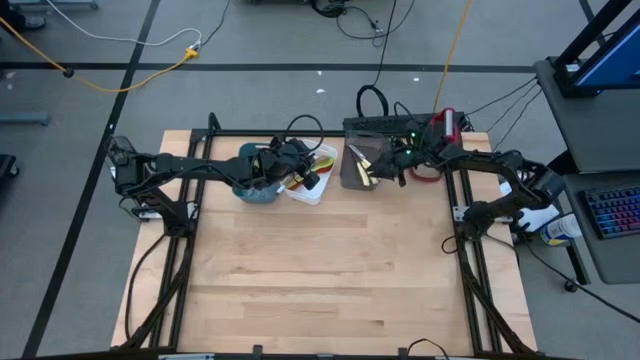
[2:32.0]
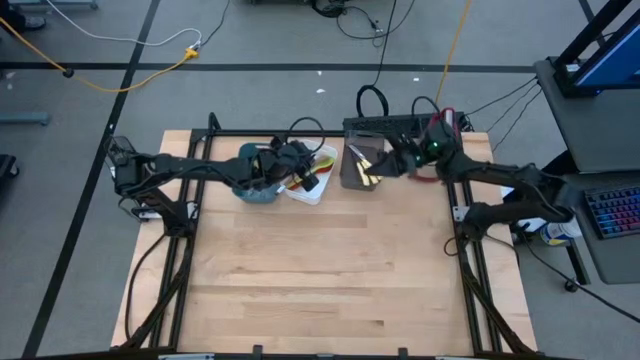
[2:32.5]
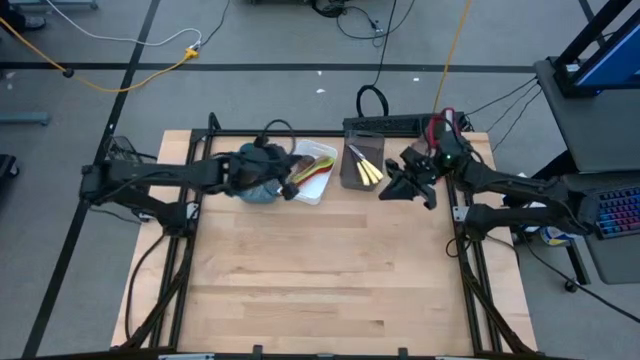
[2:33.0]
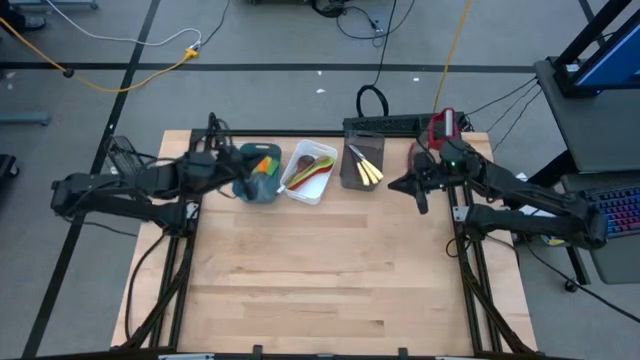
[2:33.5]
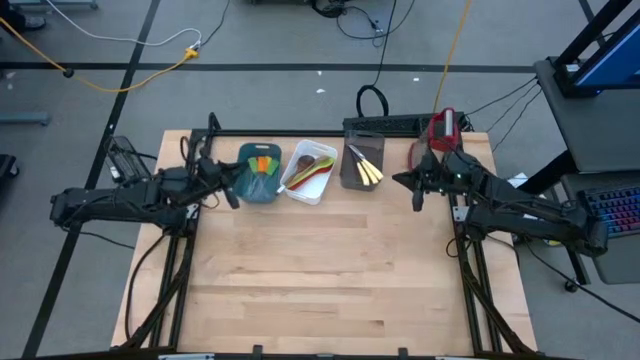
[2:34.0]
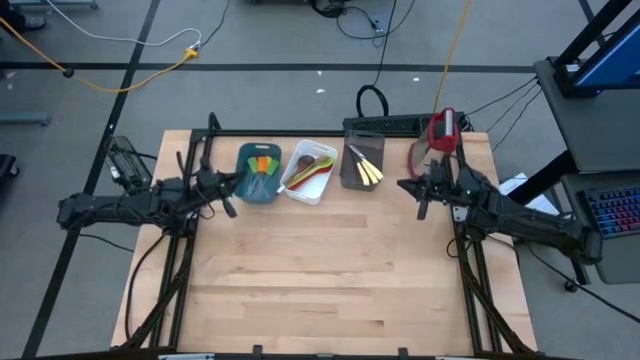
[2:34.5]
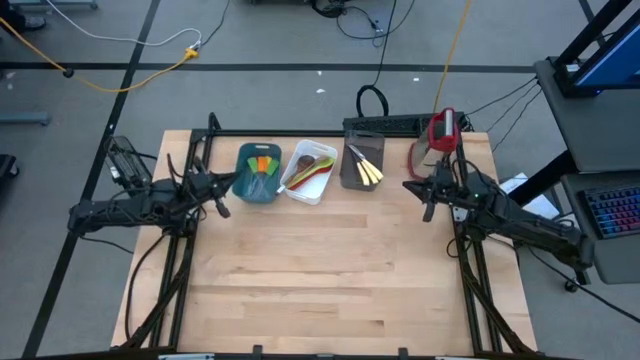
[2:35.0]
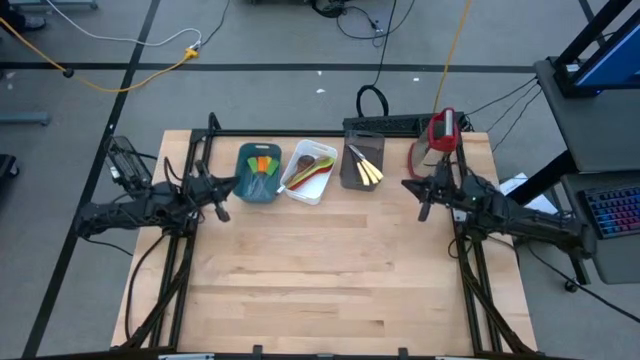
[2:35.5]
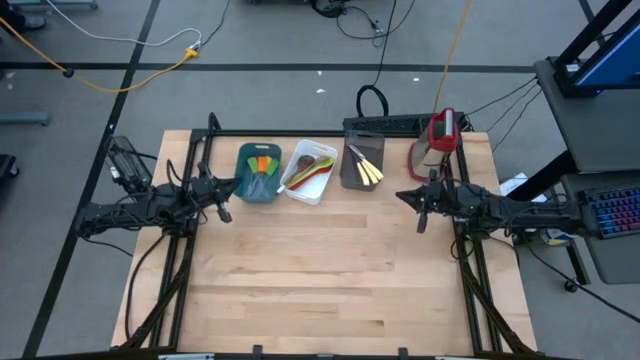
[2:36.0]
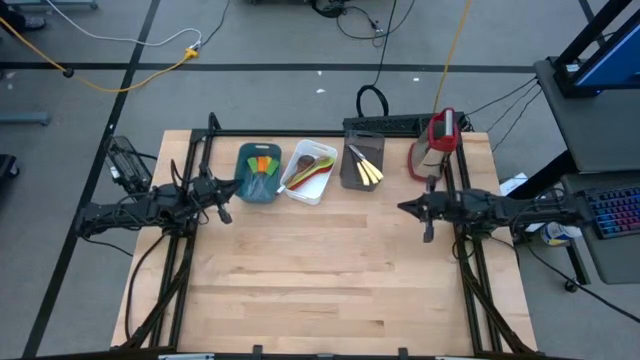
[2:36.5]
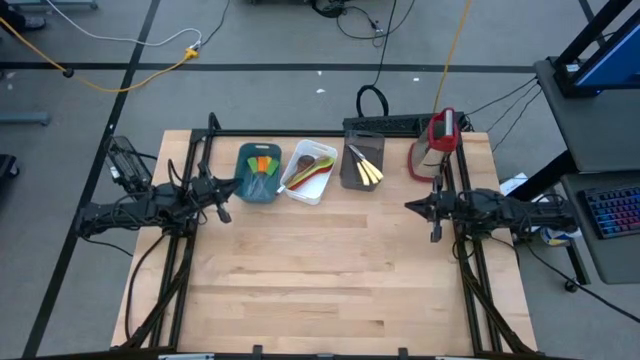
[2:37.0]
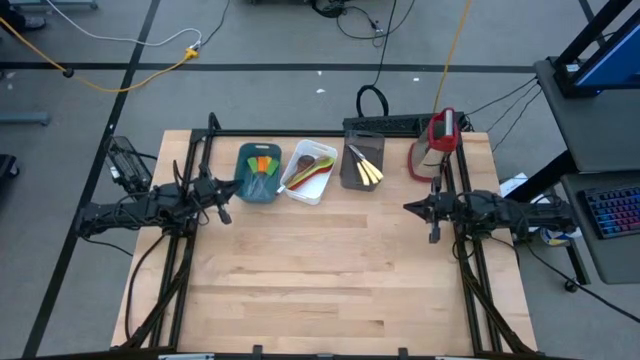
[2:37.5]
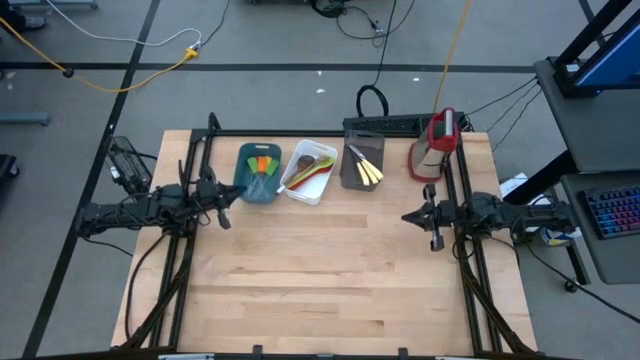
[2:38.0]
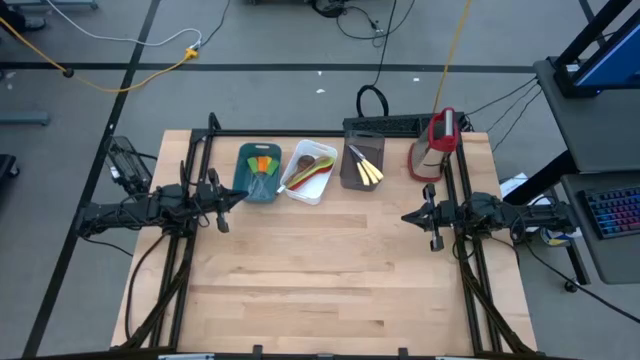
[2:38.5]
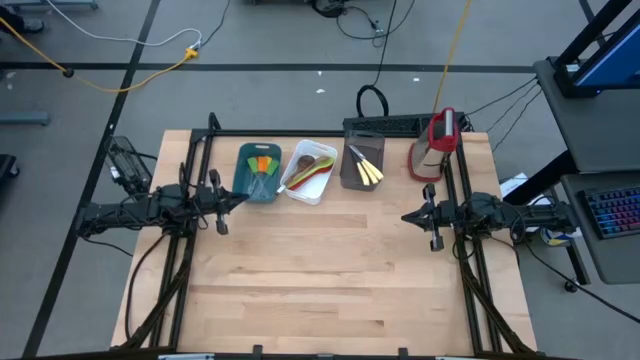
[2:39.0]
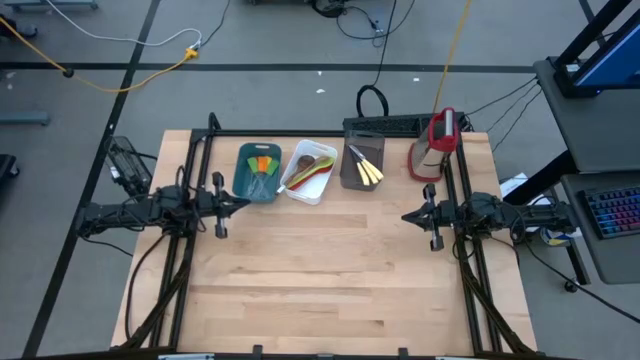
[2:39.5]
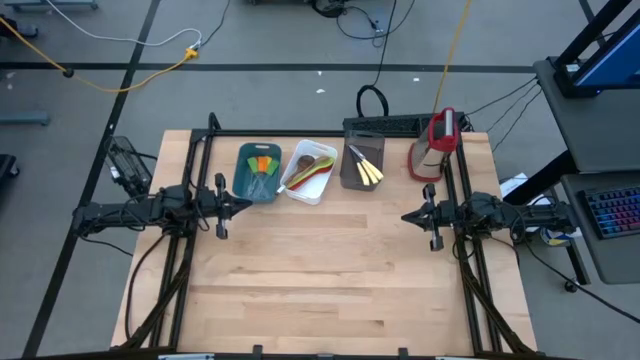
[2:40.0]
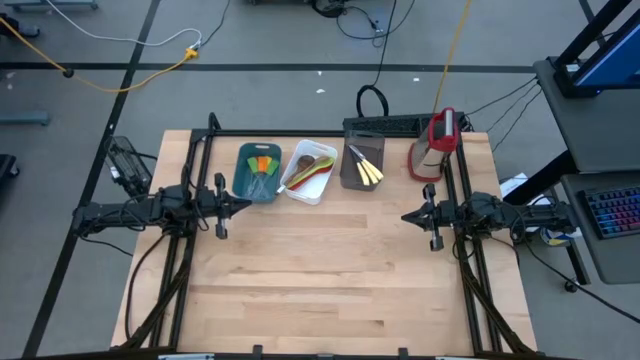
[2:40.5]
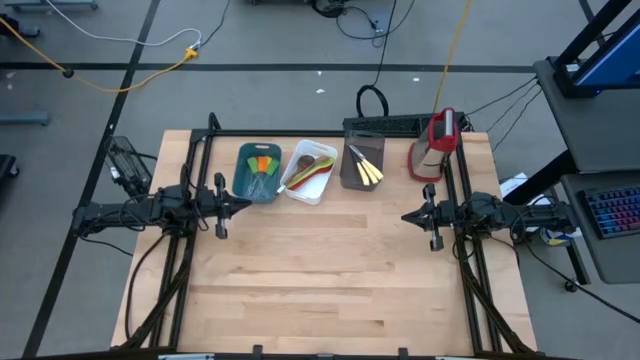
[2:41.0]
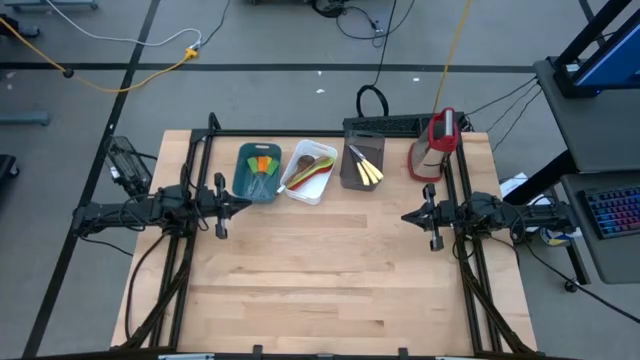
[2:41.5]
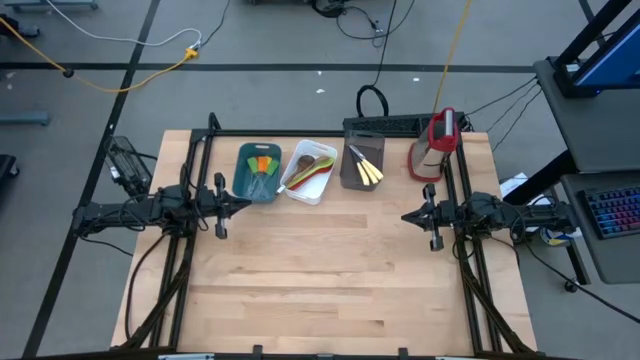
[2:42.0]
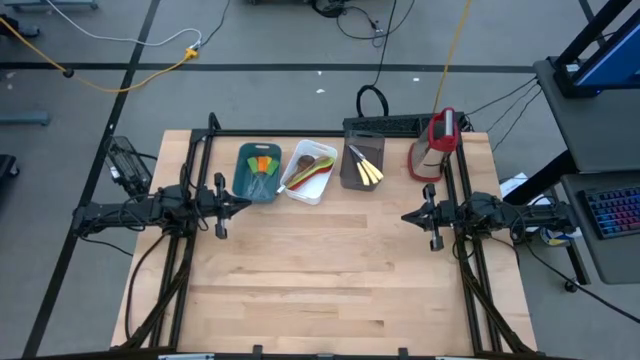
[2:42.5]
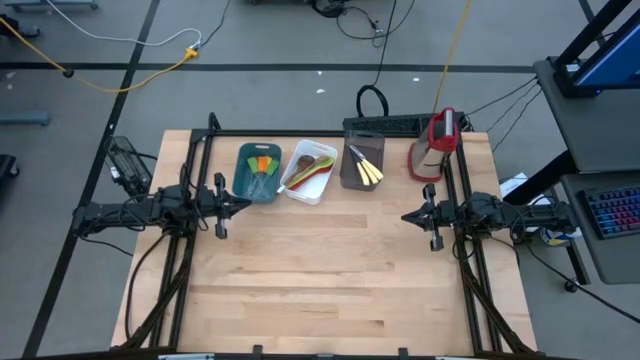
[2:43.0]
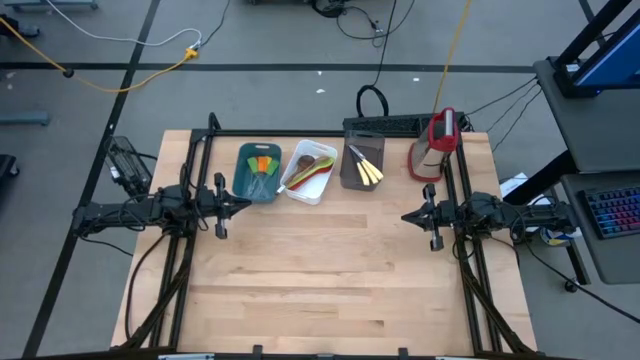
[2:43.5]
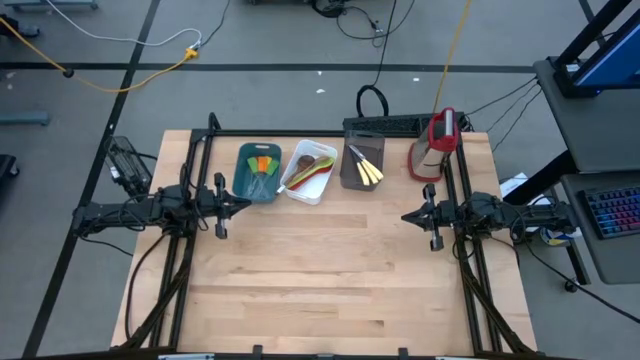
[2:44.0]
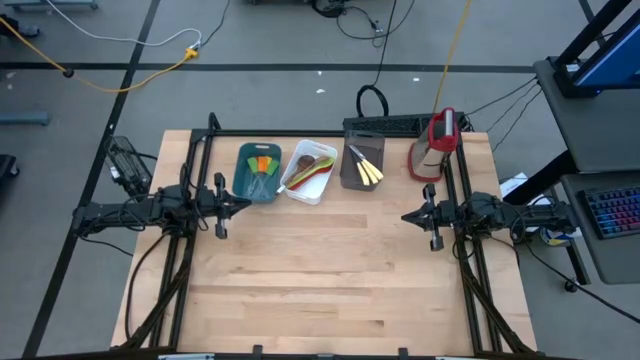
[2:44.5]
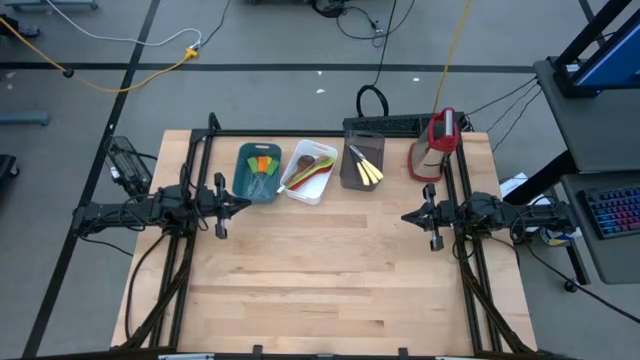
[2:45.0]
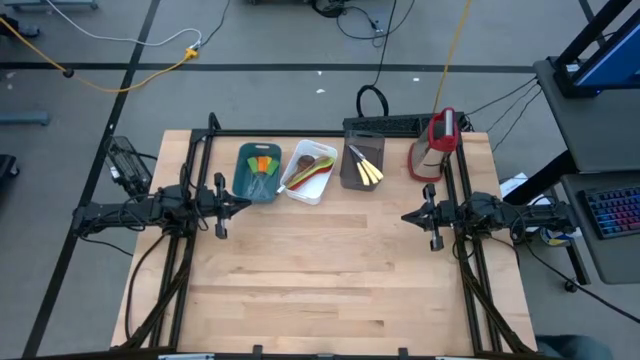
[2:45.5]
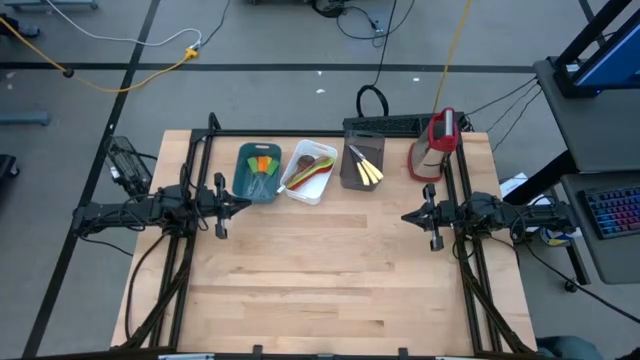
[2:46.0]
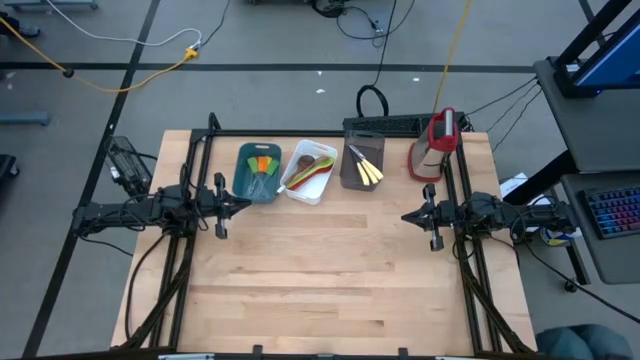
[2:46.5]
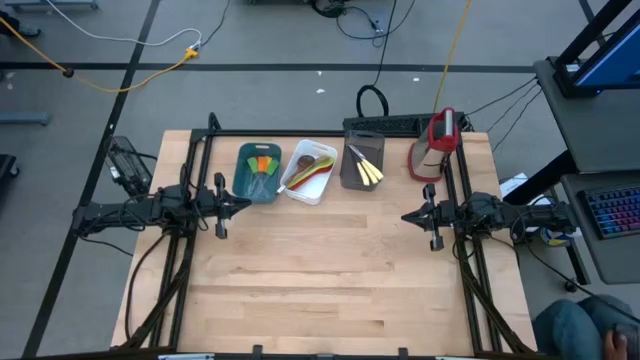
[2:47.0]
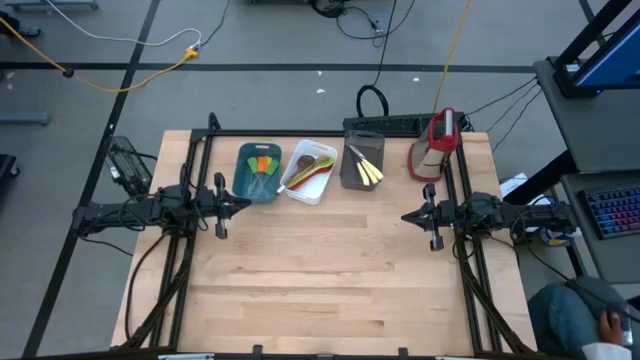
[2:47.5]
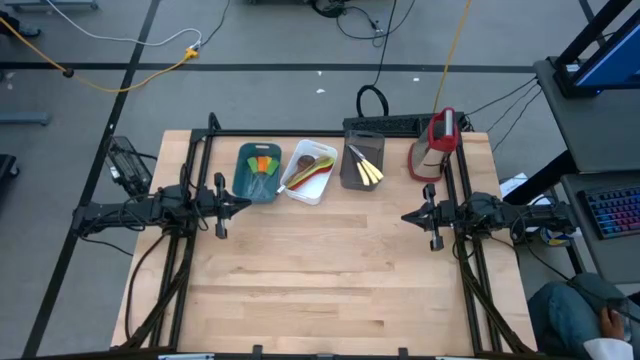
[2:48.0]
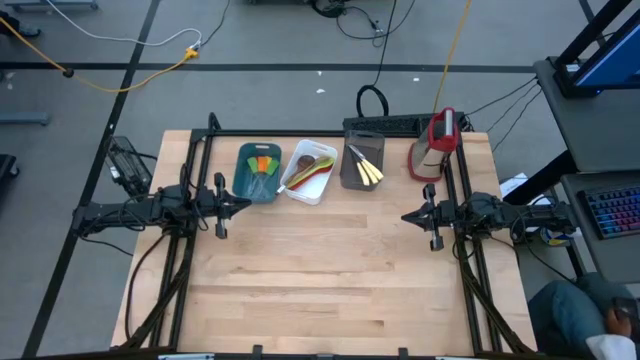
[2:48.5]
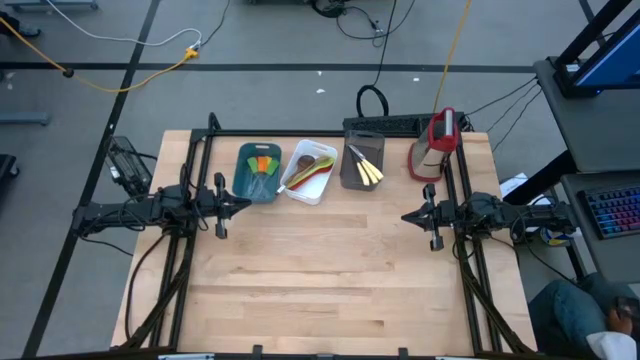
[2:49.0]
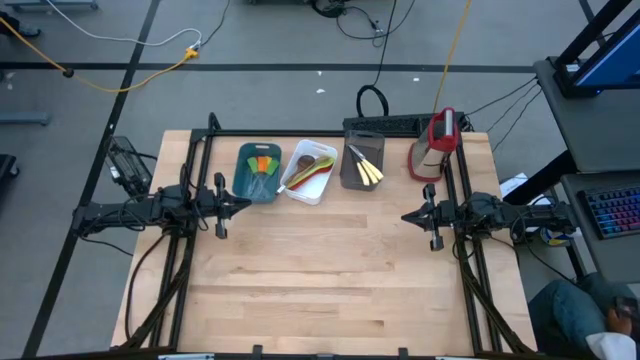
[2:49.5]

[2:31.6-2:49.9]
Task: Pick & Place Kitchen Items
Return to Home Position

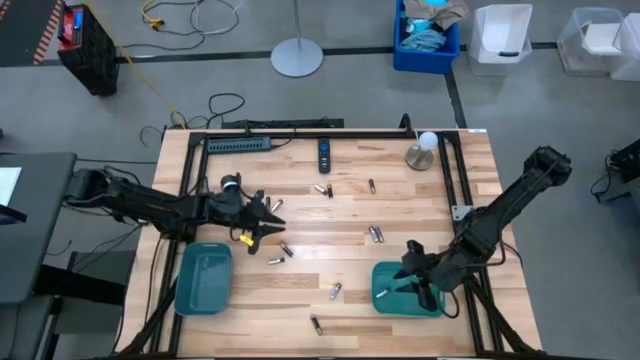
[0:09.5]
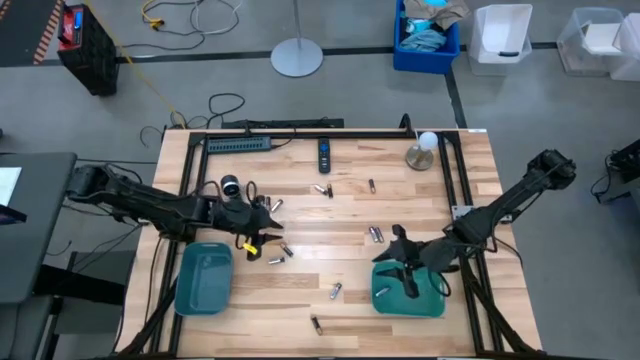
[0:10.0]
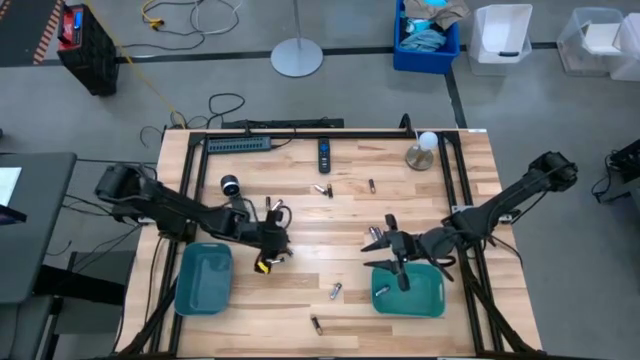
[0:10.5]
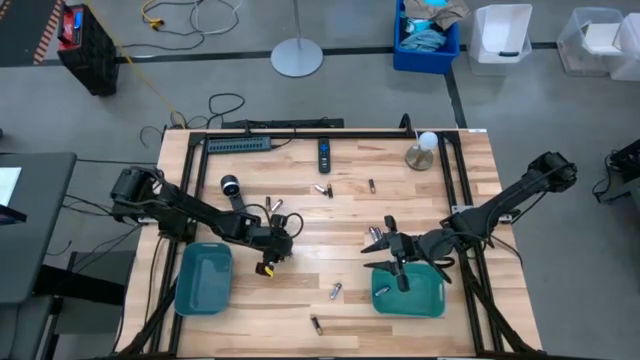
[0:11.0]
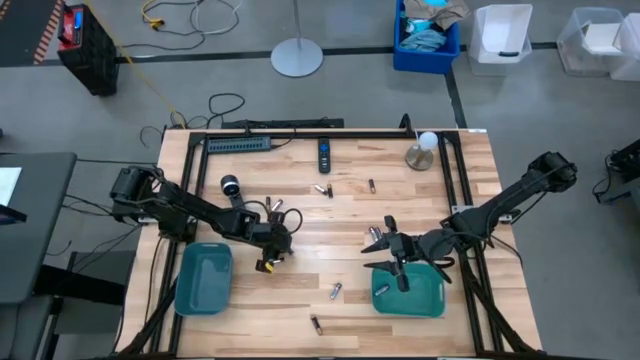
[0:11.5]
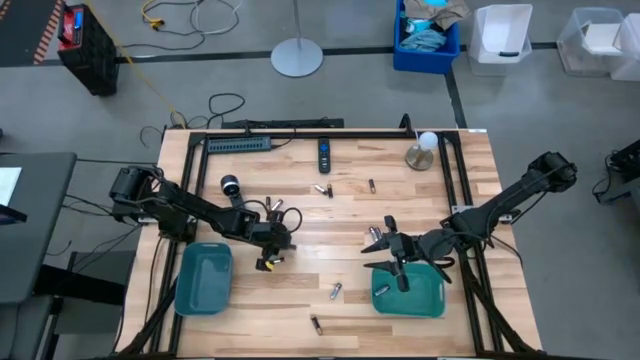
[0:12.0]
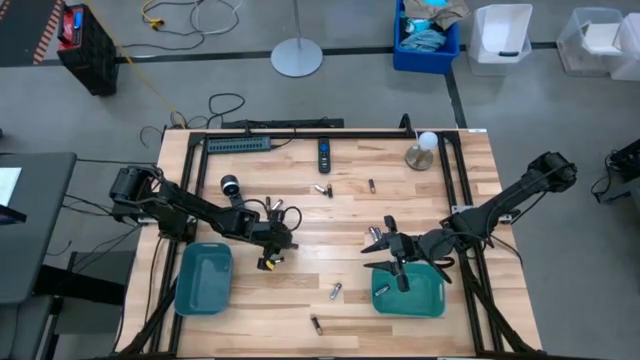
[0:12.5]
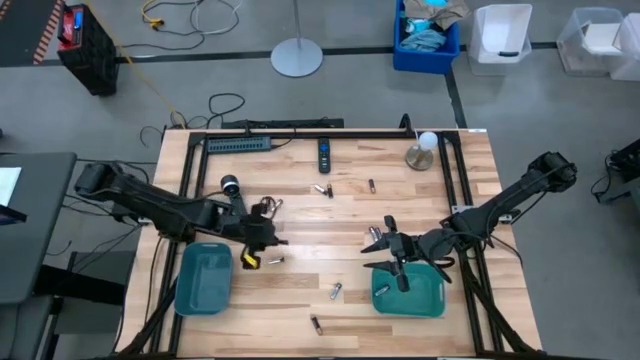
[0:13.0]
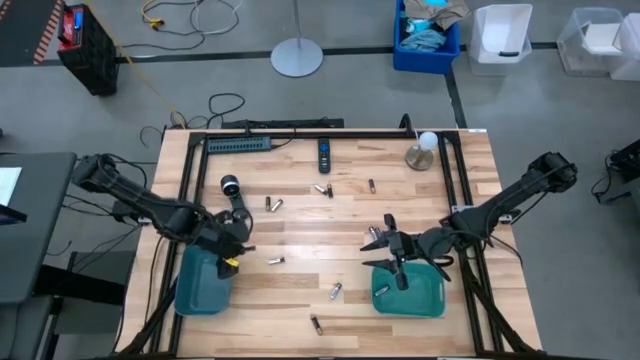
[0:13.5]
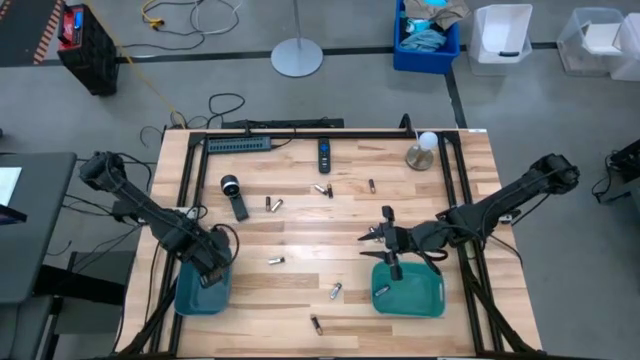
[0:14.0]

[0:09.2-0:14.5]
Task: Sort batteries
Put the black battery into the blue bin
